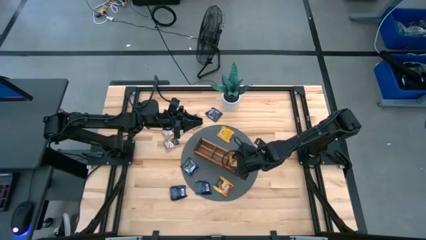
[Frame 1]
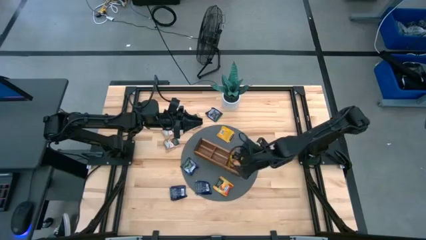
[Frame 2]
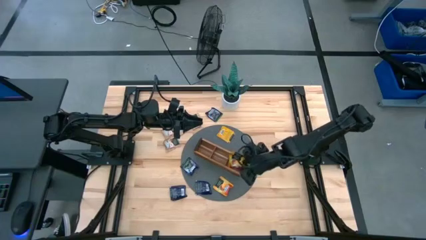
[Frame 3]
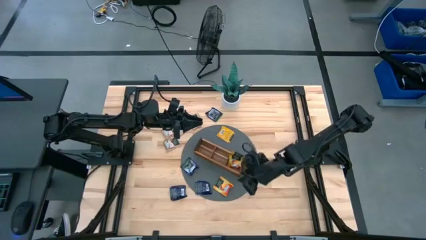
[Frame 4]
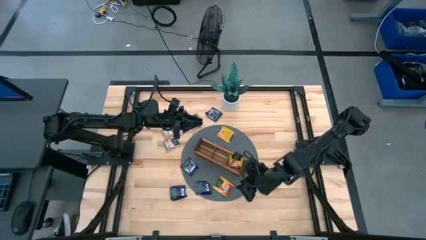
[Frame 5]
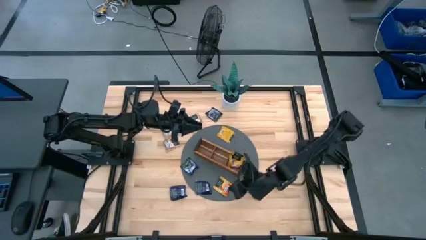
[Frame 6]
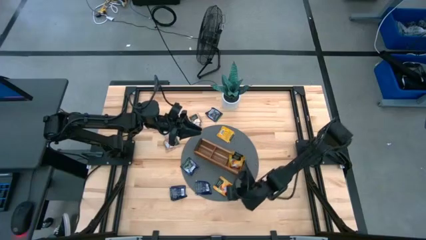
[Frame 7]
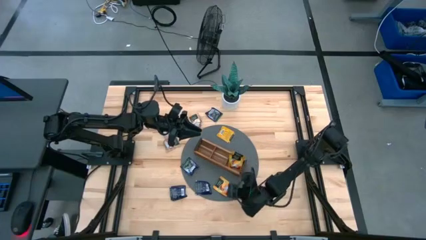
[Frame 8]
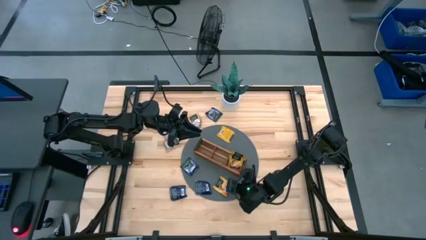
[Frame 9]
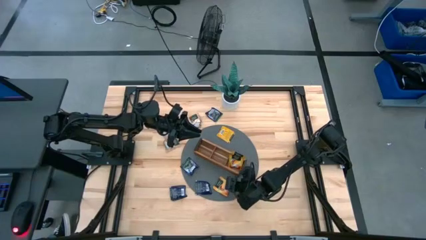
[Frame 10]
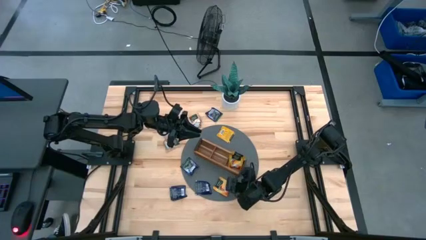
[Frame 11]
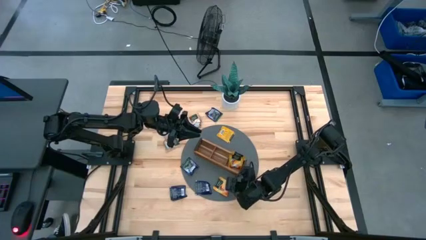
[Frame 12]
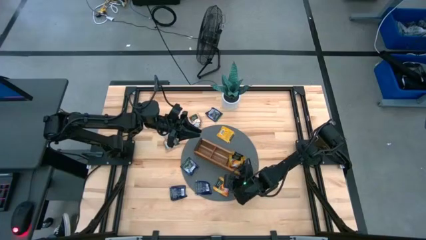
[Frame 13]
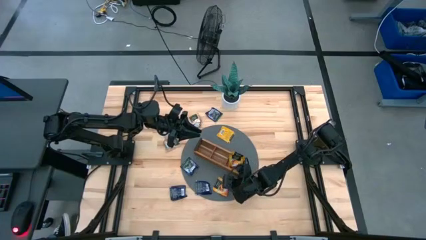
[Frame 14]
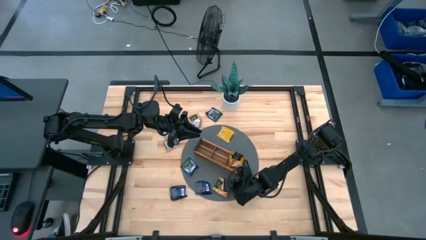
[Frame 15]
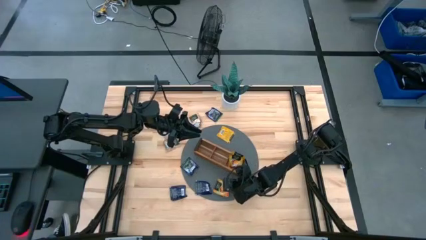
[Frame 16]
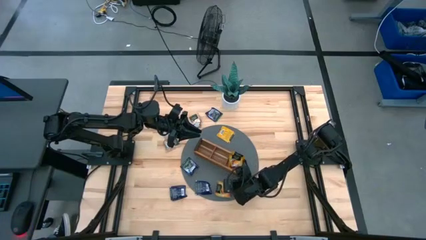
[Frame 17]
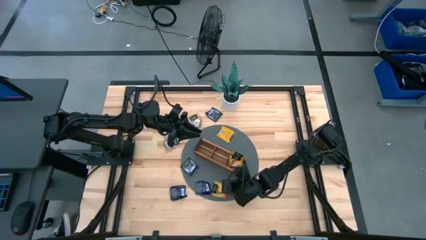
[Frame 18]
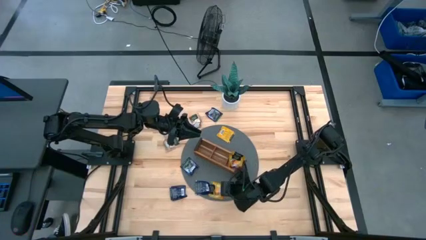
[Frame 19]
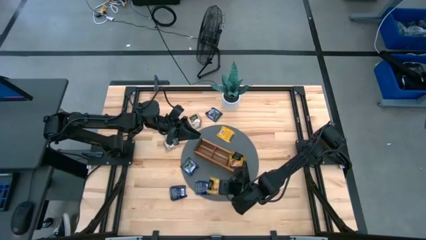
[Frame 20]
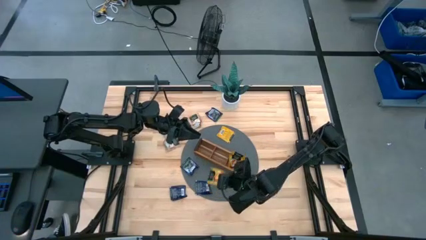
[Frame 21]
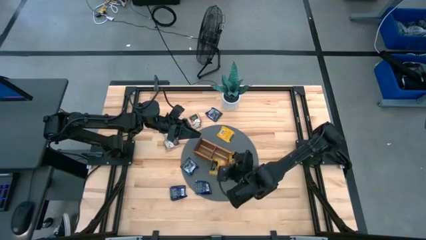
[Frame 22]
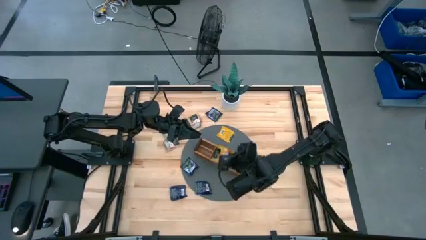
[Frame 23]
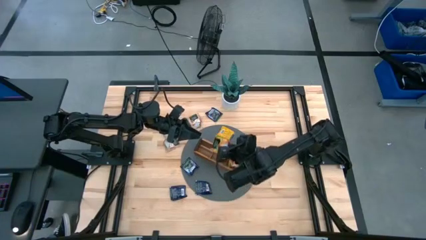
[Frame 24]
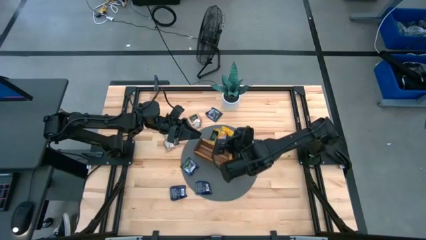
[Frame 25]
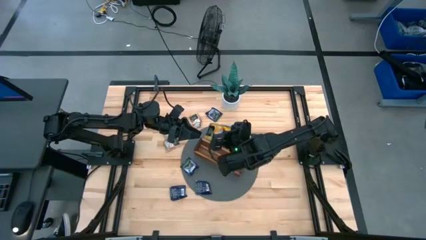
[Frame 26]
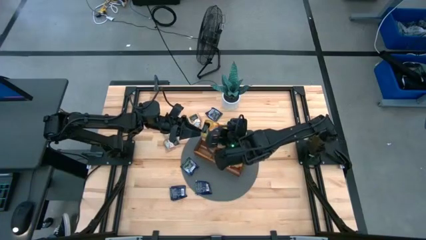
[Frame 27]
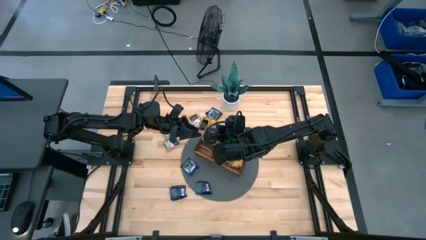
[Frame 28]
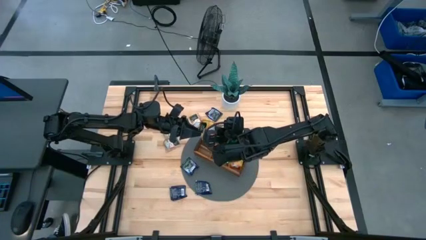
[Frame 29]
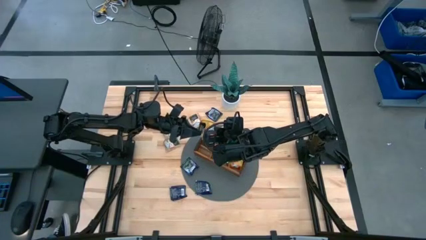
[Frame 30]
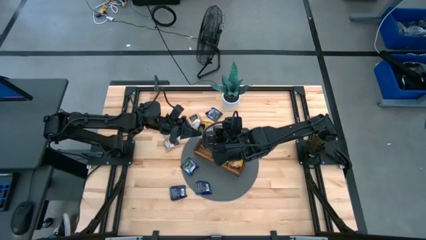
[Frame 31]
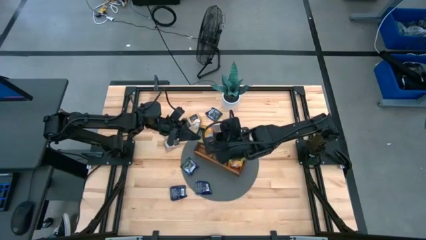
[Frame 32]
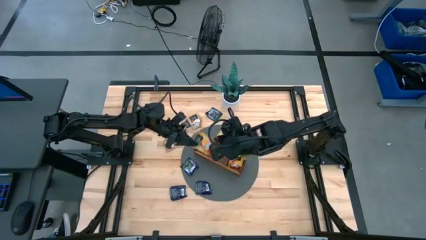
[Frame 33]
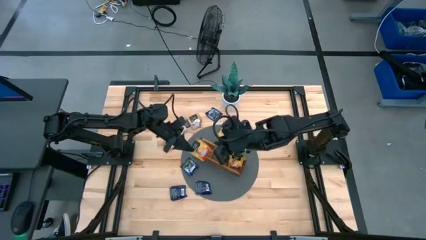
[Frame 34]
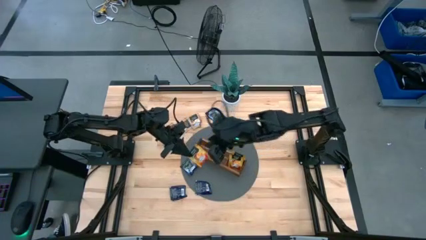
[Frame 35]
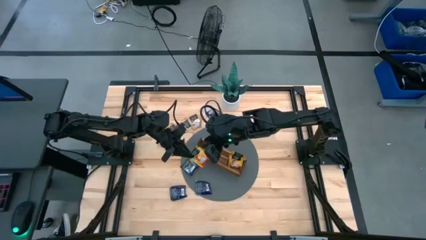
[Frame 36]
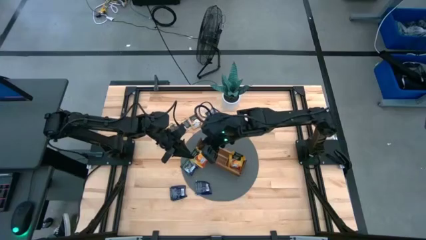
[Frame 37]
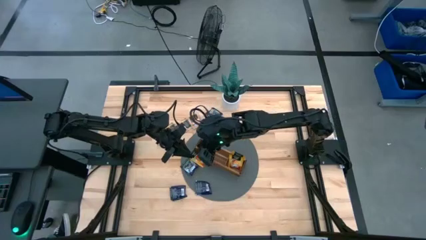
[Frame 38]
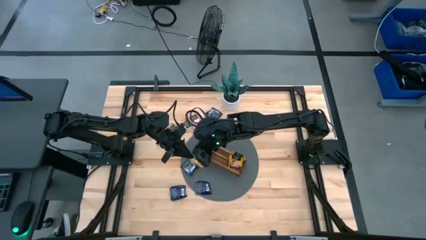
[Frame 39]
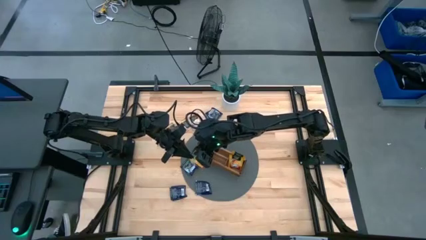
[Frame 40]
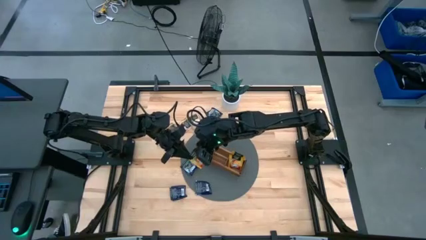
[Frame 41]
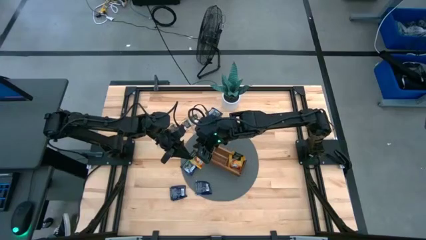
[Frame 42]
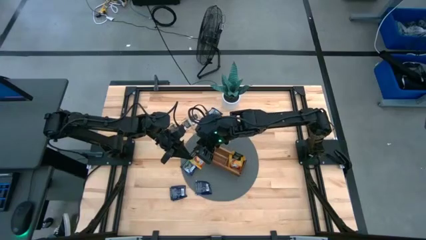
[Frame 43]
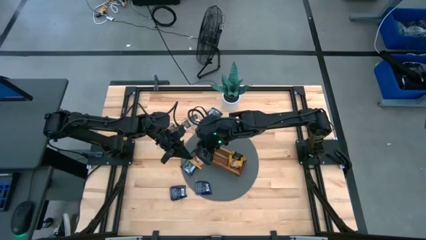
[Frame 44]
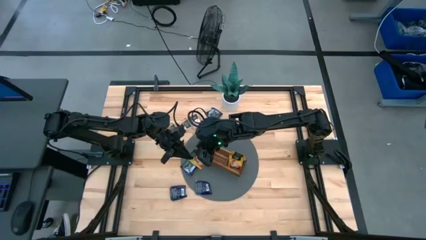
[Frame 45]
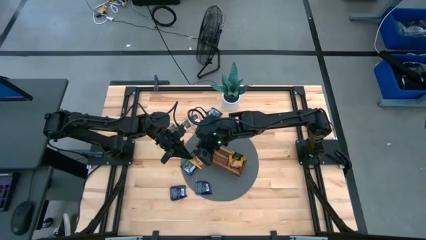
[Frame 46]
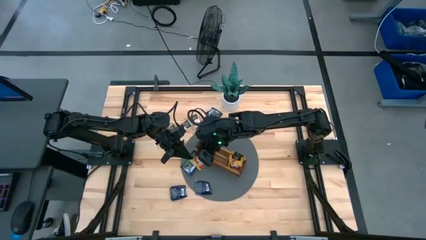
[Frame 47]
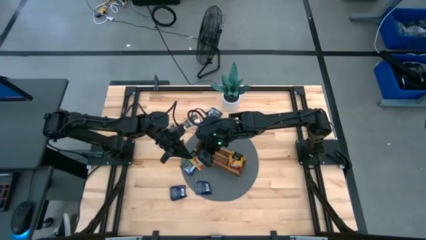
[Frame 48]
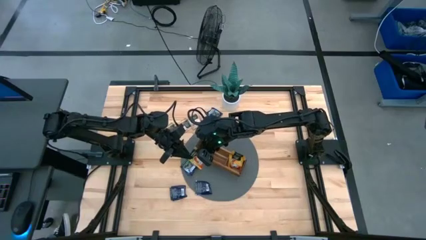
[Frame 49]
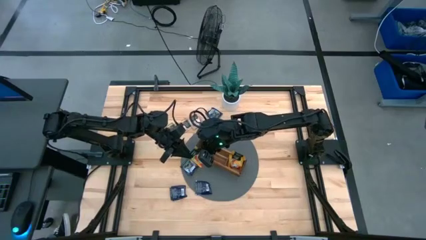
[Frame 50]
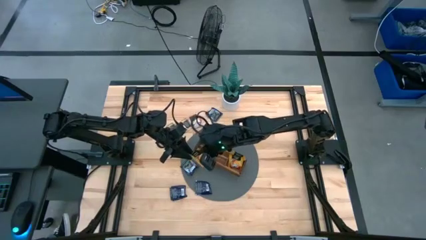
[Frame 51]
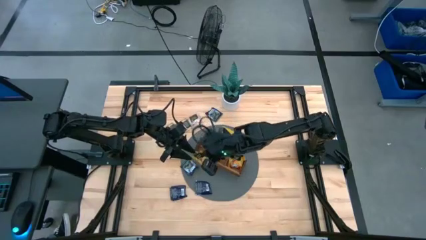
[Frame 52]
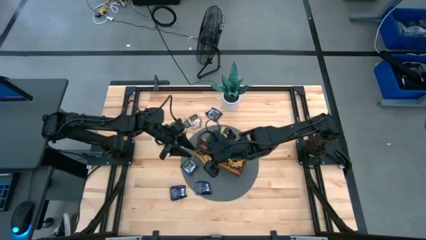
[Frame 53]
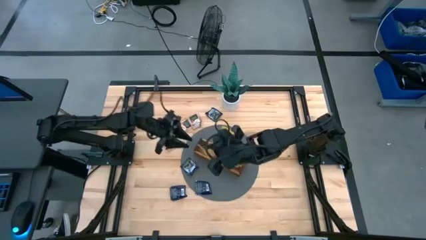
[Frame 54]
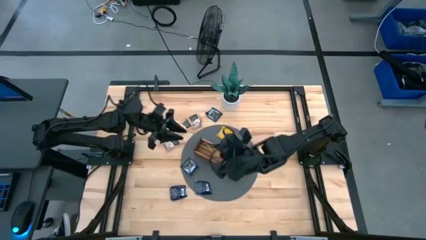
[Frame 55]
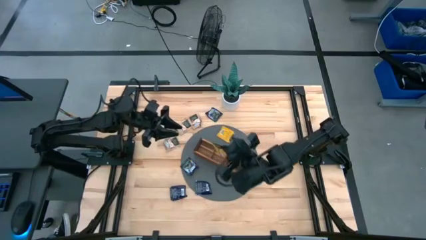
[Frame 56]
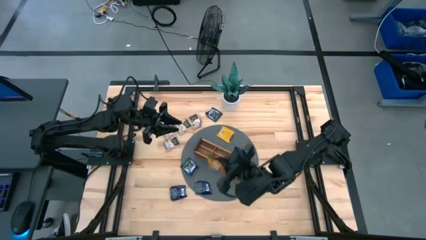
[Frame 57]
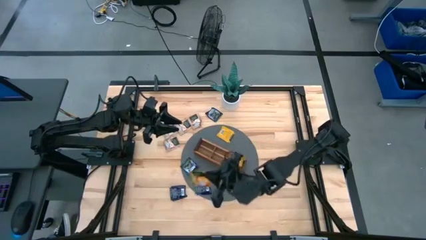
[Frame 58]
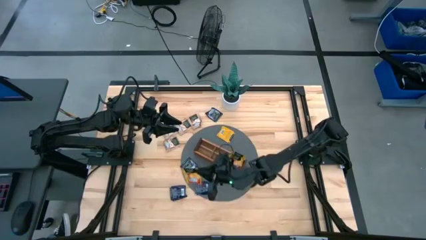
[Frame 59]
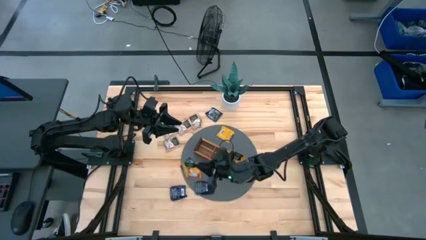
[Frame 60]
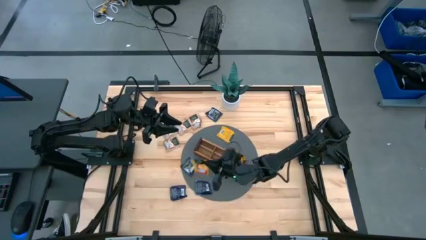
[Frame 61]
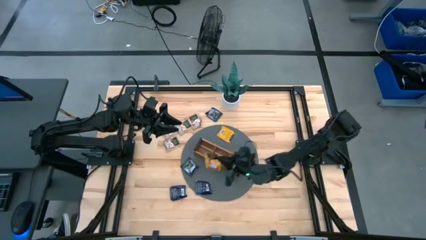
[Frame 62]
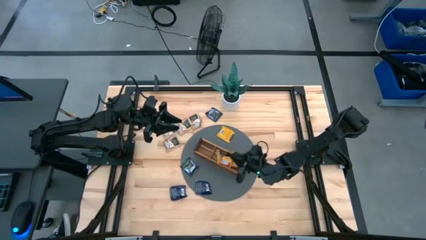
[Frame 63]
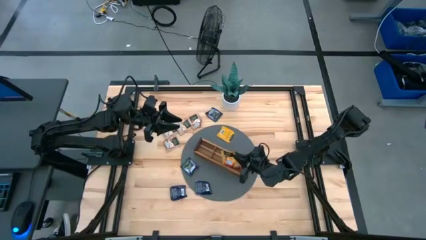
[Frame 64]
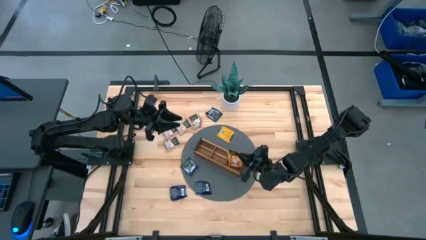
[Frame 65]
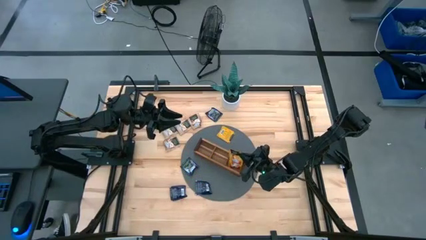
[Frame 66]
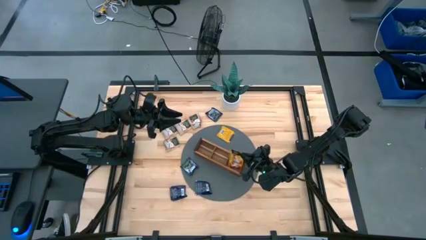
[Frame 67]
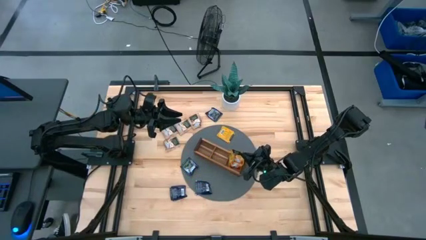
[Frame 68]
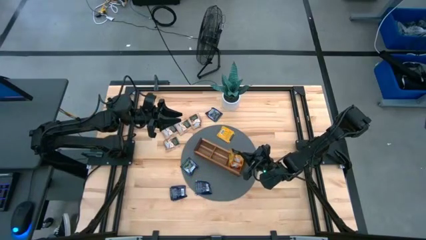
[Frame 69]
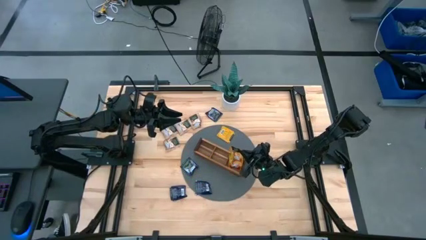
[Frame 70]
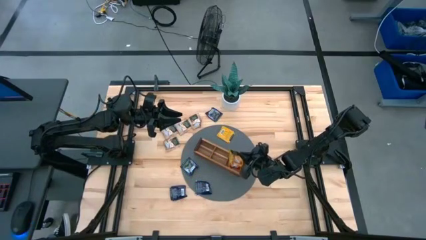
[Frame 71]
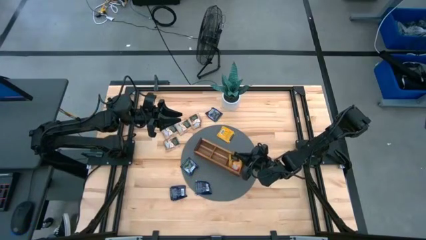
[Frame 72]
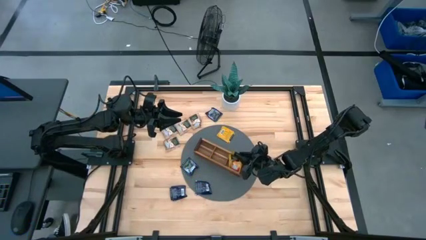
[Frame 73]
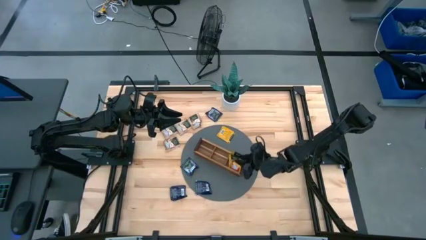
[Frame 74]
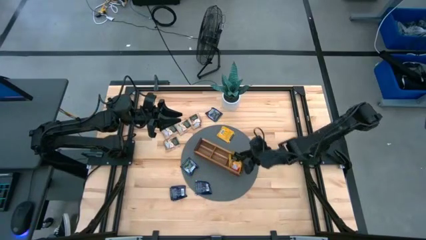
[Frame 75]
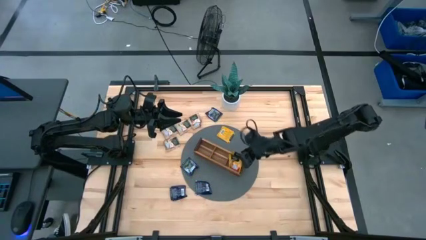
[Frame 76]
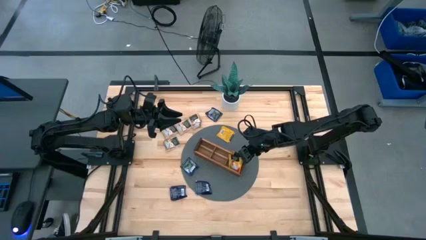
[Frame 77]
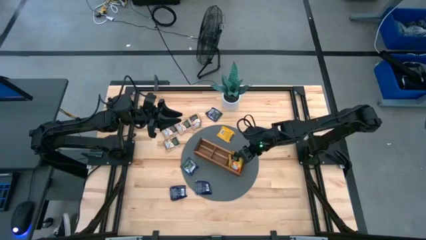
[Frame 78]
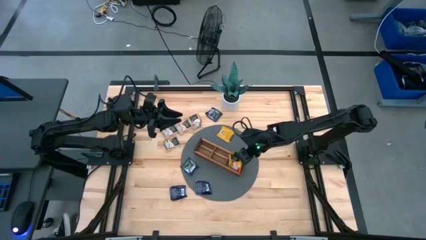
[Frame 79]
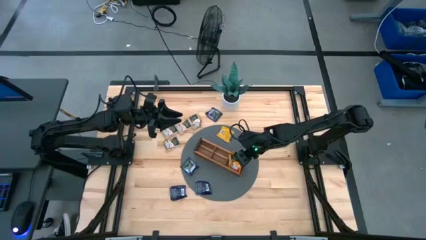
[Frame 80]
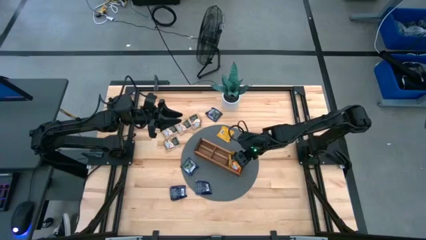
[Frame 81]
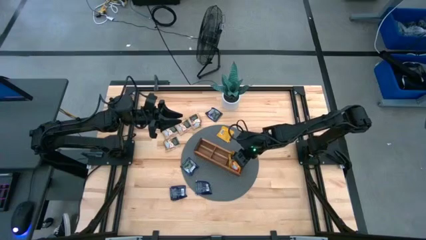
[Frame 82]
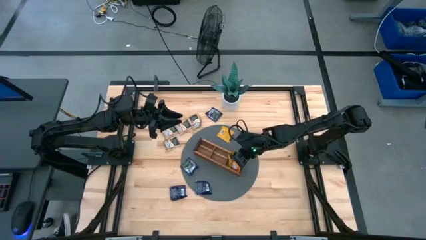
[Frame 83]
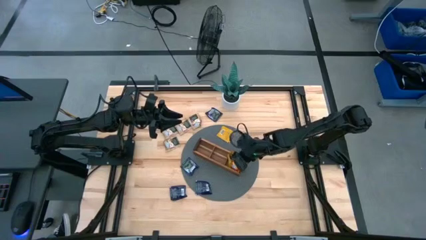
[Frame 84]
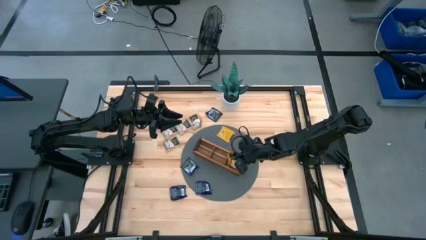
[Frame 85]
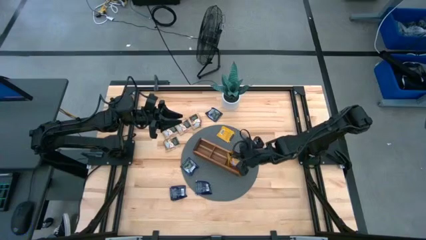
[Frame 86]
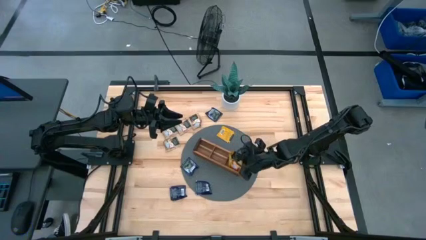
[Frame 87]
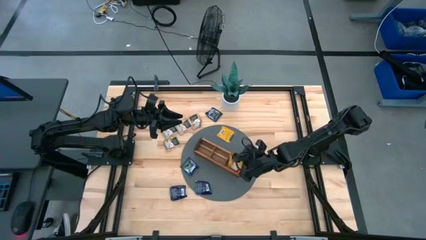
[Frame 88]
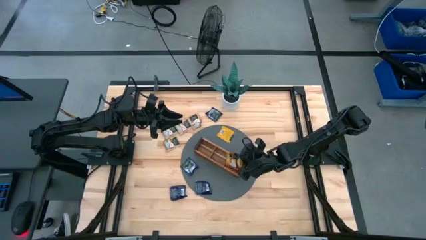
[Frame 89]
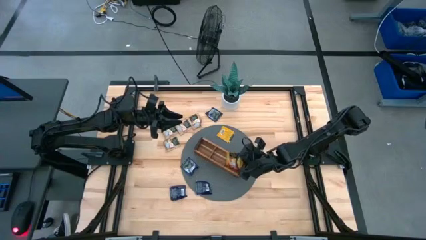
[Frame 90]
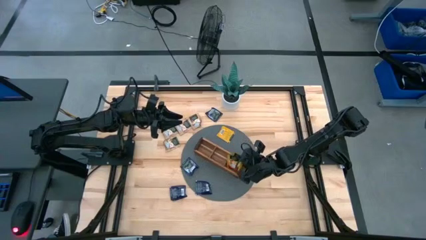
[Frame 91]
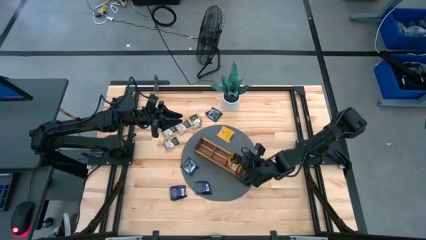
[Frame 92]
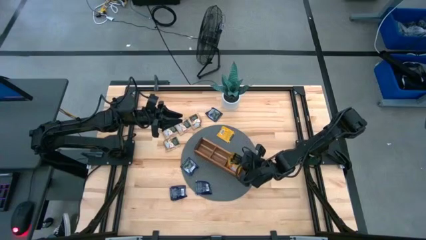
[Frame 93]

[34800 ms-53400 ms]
Task: Pick & Place Tea
Put the yellow tea bag into the right section of the wooden organizer
